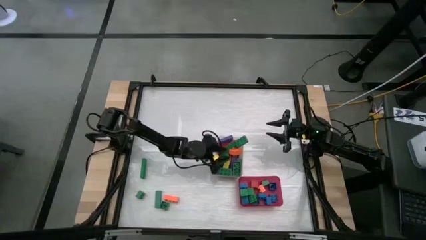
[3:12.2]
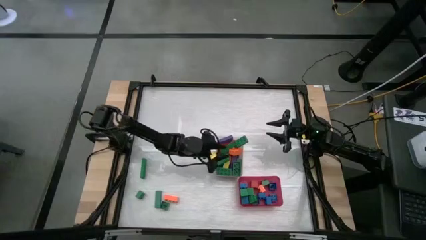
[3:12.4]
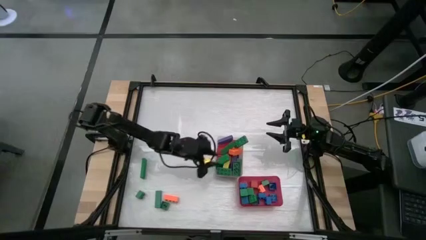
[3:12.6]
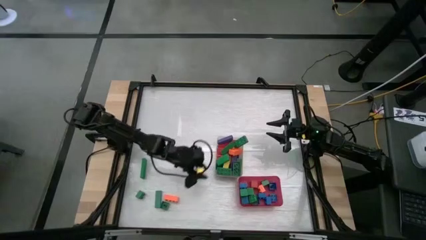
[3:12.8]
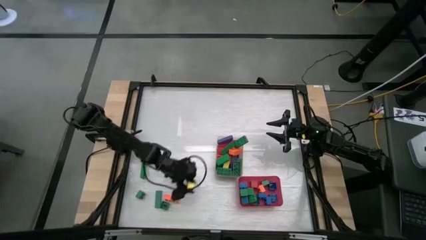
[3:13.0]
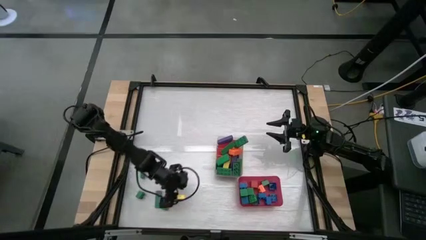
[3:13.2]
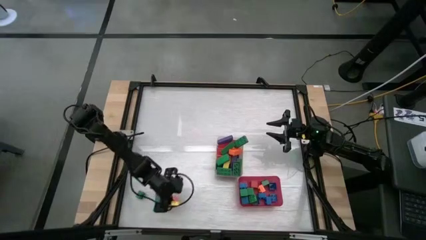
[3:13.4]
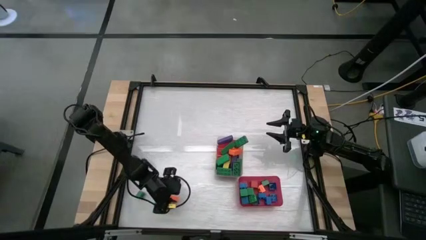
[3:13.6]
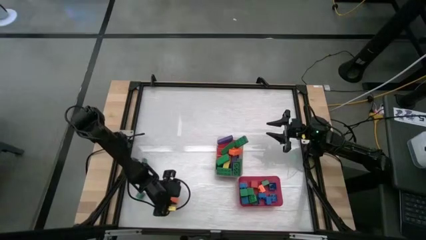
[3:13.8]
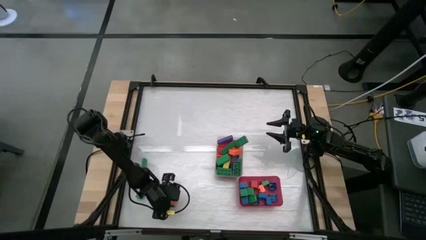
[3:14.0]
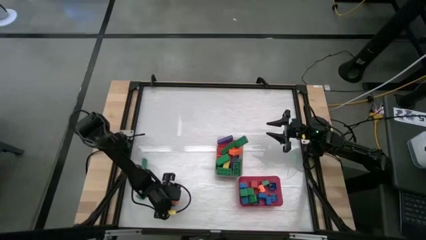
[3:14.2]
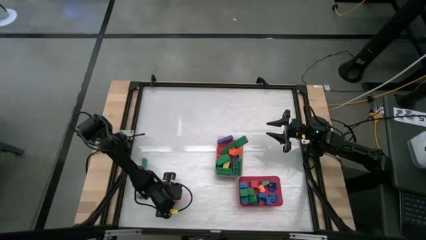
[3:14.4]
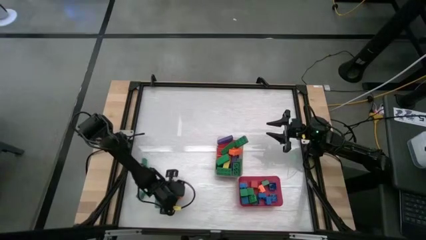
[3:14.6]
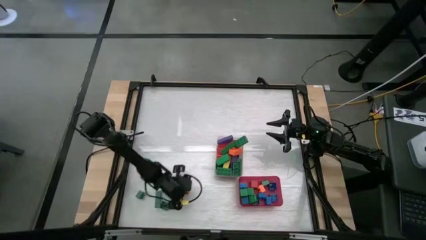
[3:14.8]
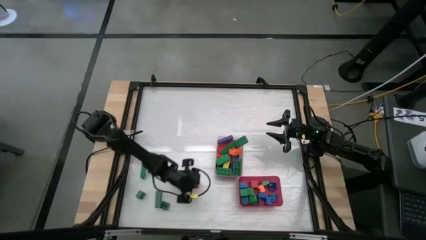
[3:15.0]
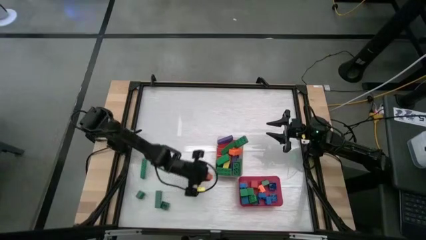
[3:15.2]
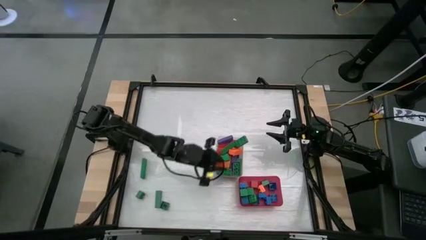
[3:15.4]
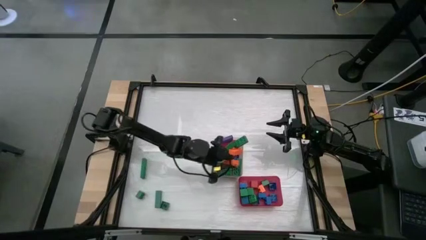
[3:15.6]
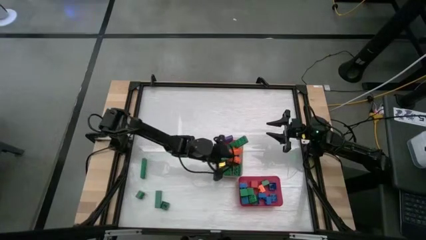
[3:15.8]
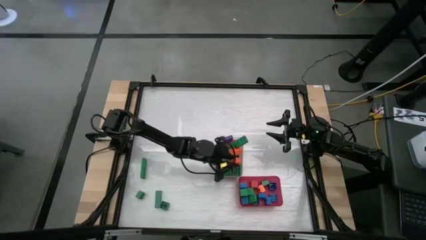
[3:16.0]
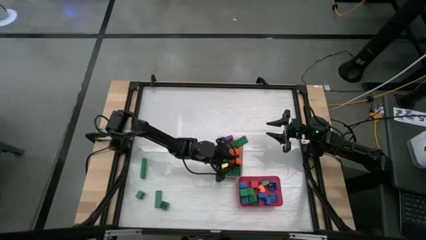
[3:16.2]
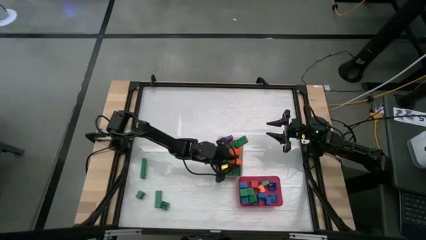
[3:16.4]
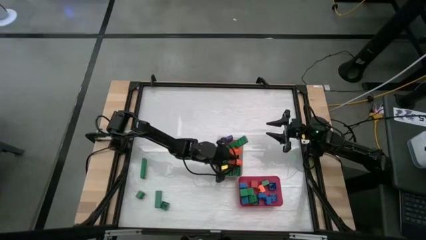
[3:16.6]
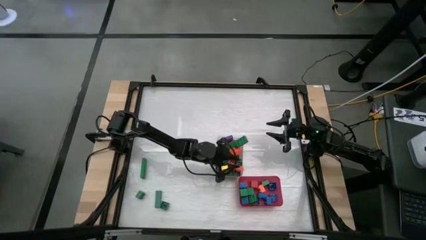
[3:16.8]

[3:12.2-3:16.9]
Task: Sort blocks by size
Put the orange rectangular game piece into the transparent bin

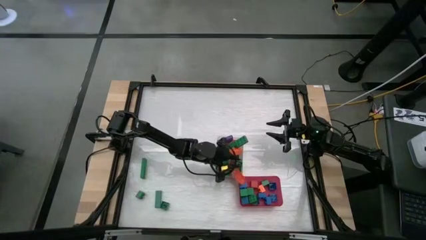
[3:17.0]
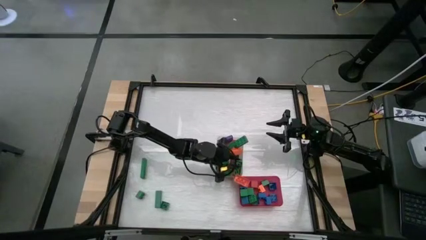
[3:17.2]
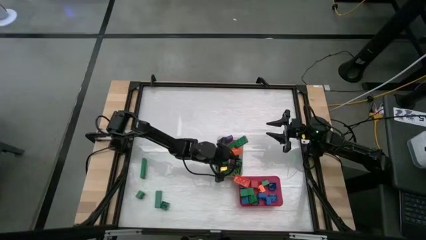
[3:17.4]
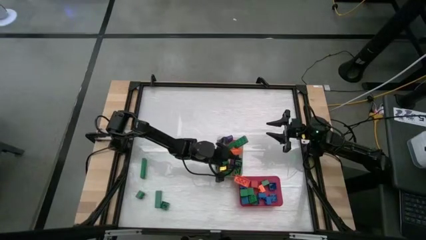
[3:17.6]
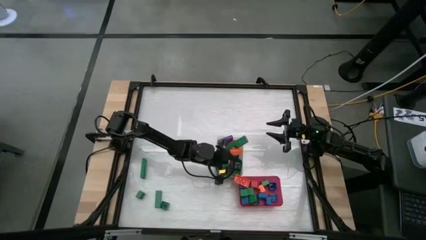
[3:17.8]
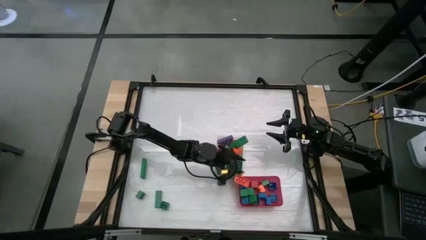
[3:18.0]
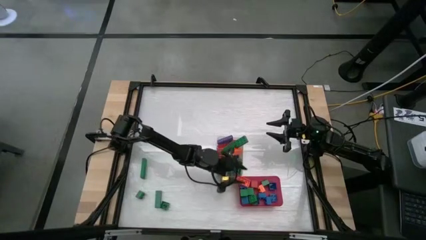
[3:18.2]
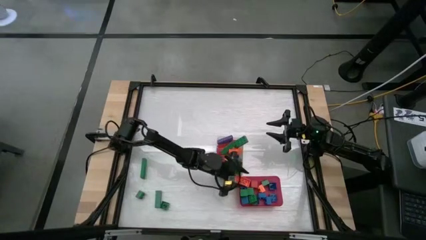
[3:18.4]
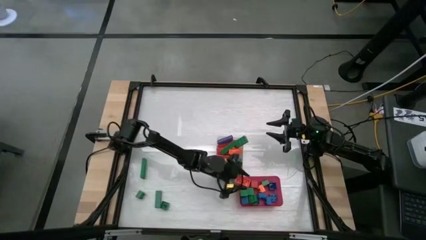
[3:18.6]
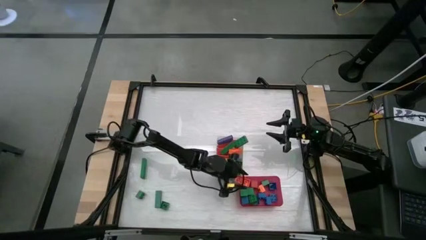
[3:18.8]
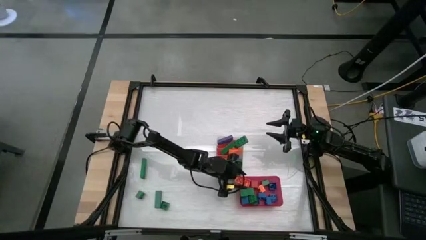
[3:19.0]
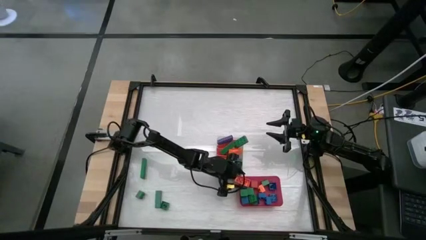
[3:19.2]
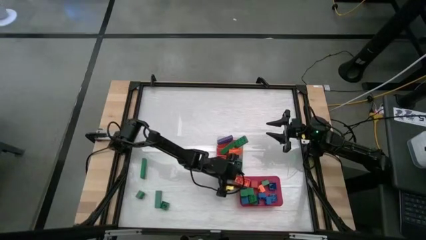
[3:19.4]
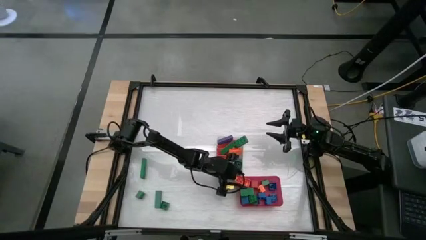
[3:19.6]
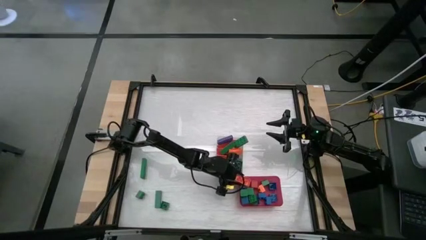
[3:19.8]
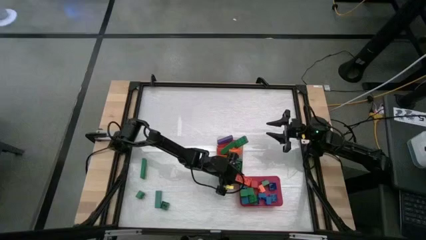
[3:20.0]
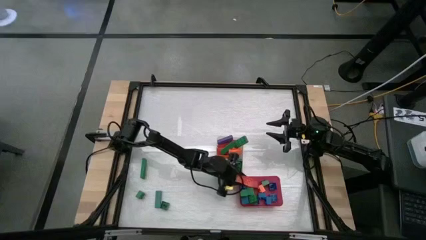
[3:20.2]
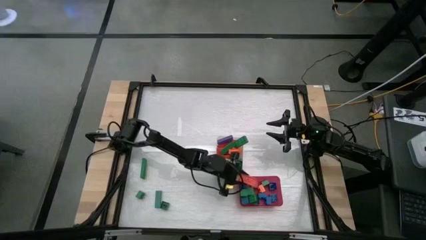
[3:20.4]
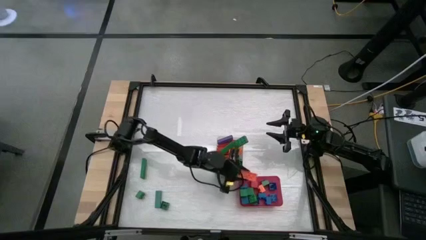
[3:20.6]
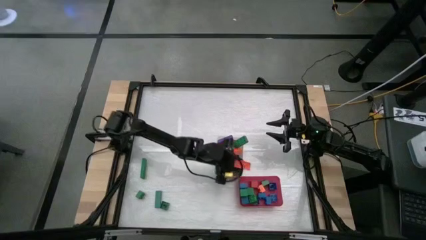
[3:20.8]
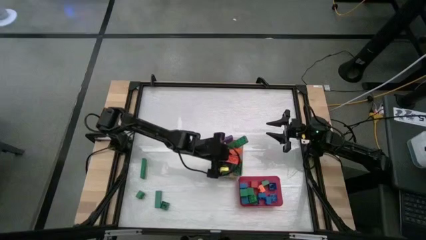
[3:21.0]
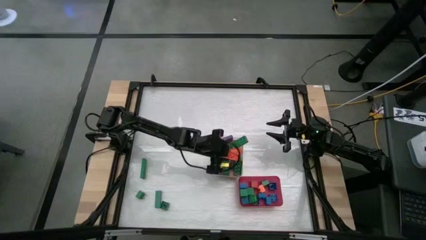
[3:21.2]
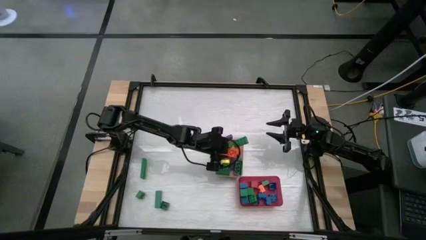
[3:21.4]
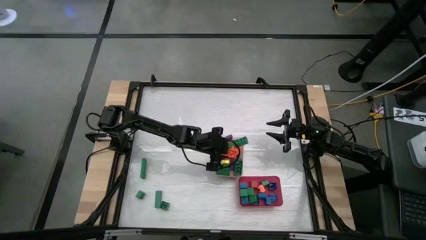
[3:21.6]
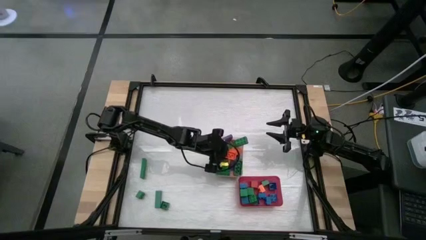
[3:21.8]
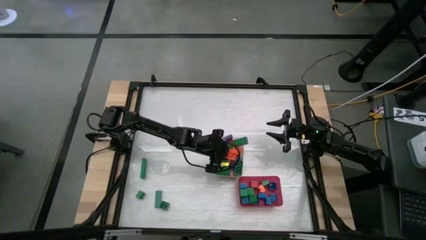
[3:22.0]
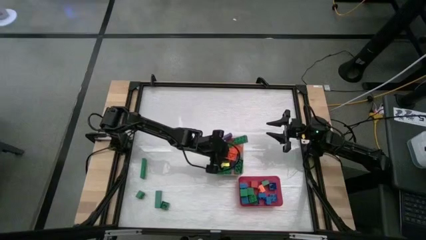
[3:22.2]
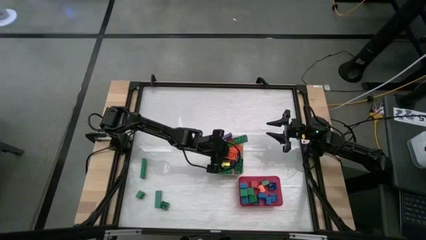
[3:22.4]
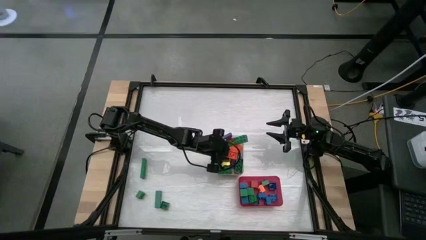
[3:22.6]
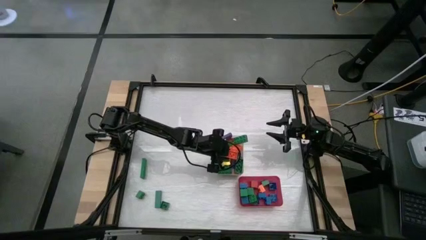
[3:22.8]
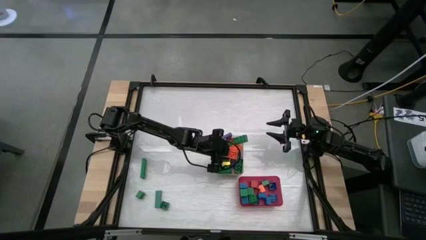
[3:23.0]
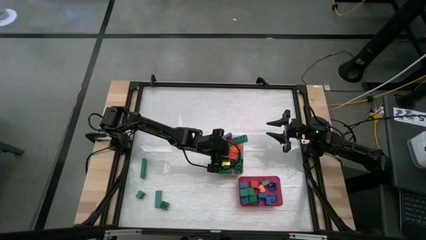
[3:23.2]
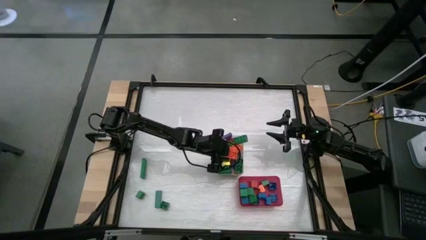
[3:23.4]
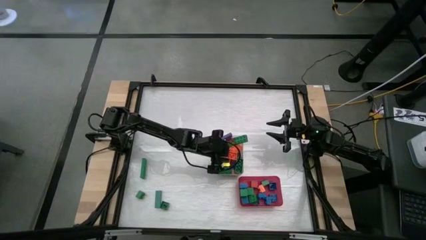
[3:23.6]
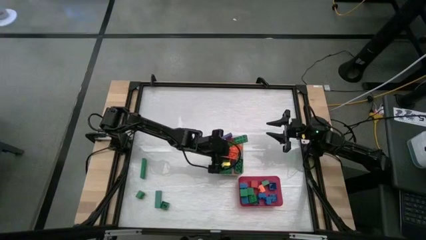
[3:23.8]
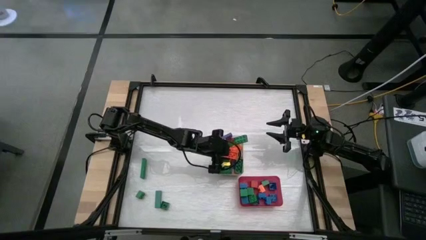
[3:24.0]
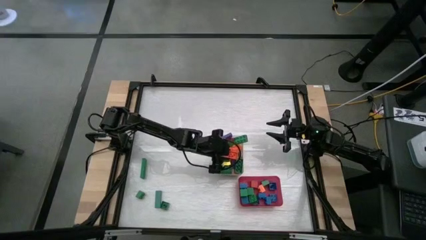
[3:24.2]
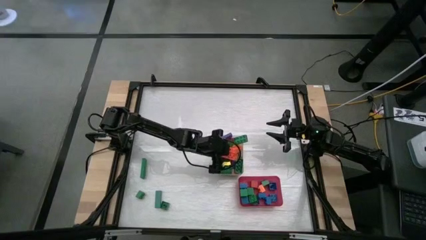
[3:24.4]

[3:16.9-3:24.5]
Put the orange rectangular game piece into the transparent bin

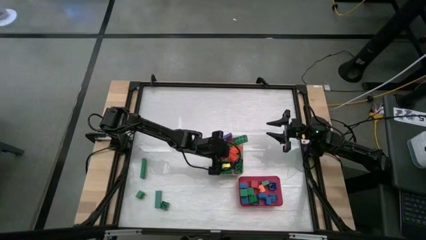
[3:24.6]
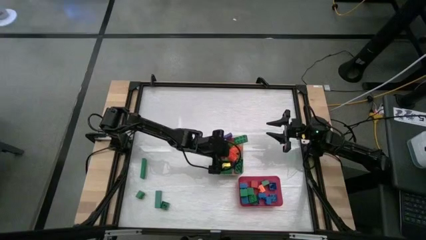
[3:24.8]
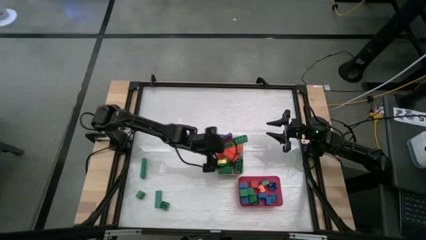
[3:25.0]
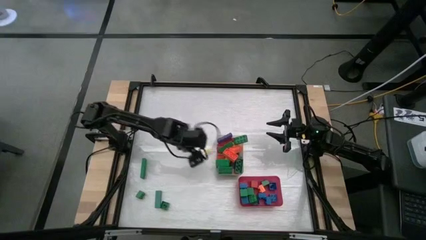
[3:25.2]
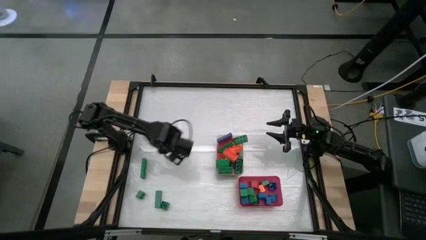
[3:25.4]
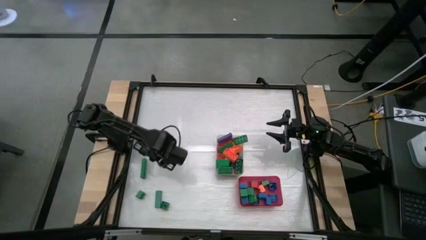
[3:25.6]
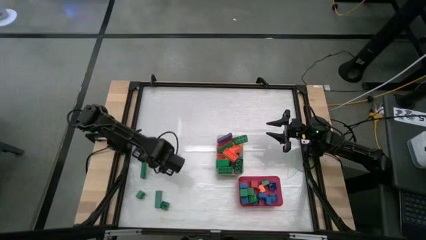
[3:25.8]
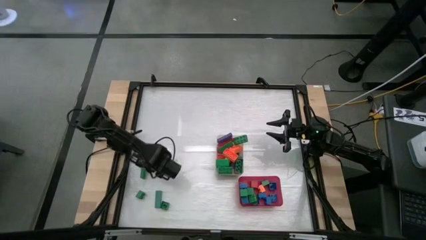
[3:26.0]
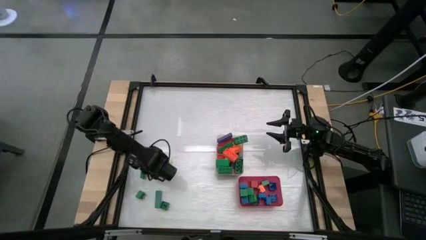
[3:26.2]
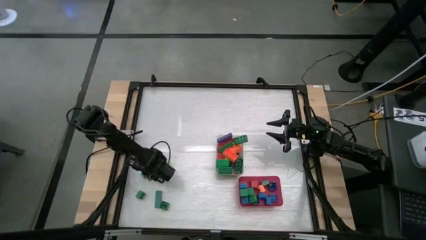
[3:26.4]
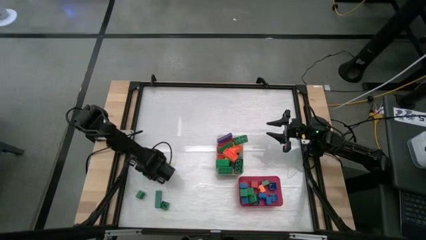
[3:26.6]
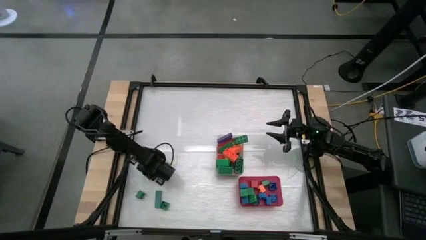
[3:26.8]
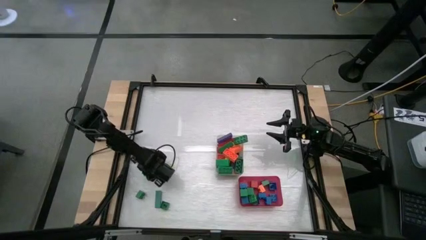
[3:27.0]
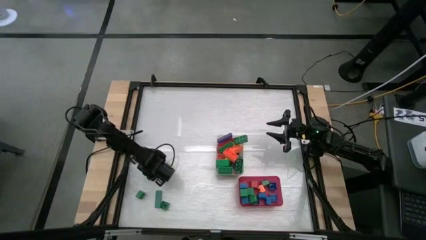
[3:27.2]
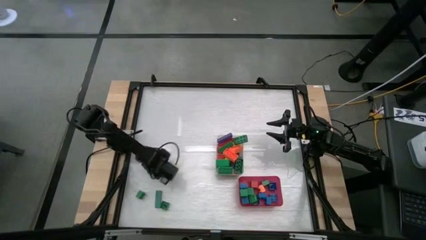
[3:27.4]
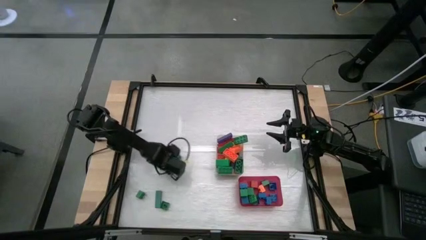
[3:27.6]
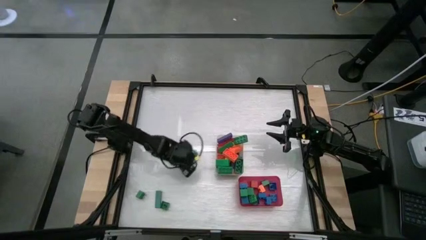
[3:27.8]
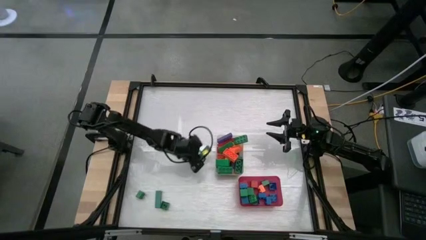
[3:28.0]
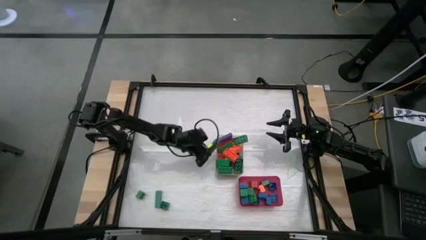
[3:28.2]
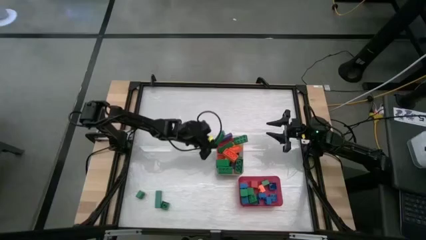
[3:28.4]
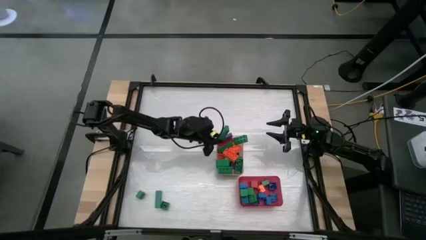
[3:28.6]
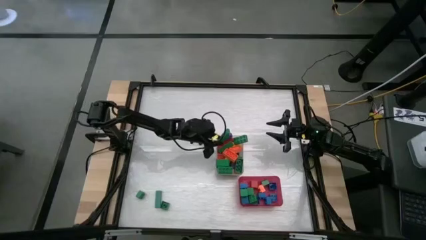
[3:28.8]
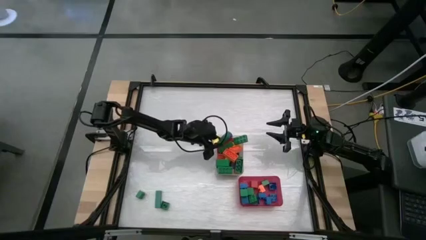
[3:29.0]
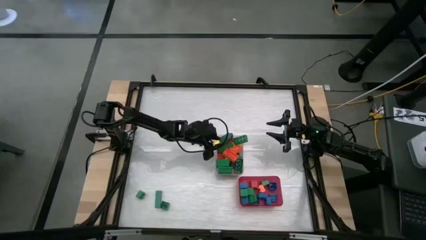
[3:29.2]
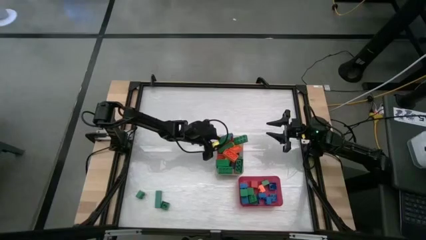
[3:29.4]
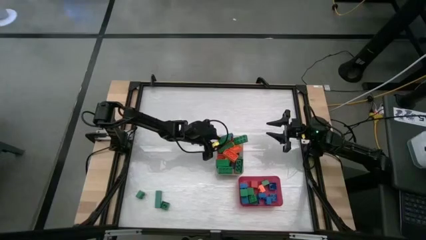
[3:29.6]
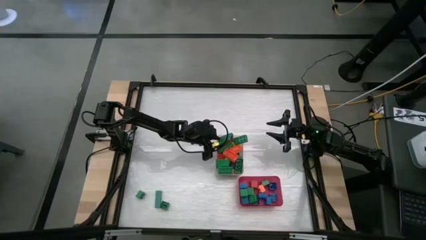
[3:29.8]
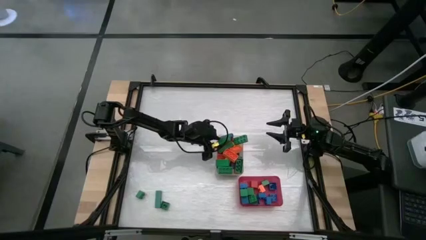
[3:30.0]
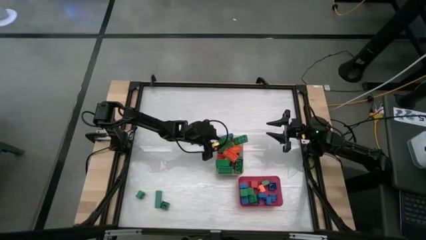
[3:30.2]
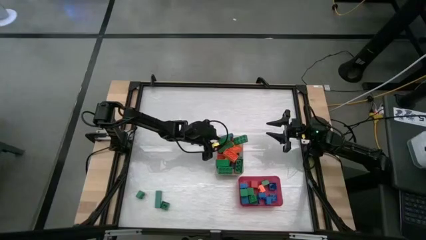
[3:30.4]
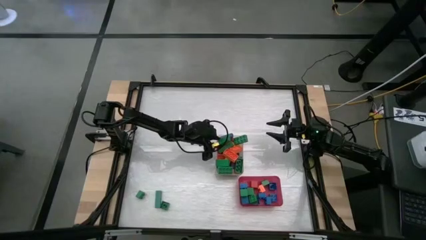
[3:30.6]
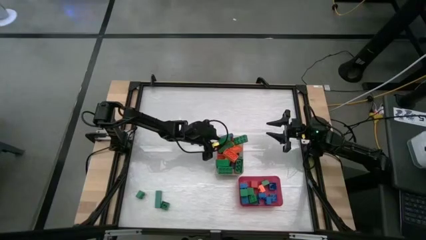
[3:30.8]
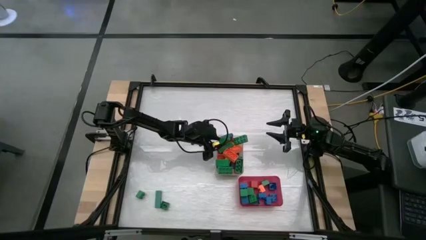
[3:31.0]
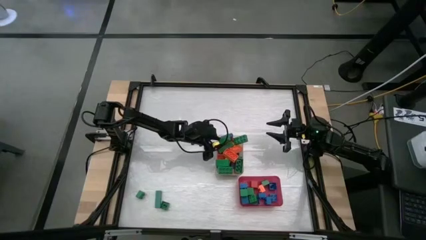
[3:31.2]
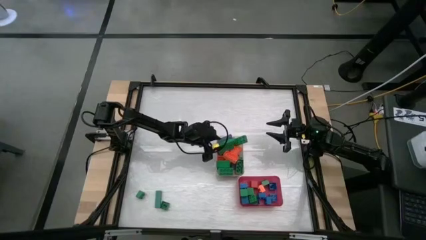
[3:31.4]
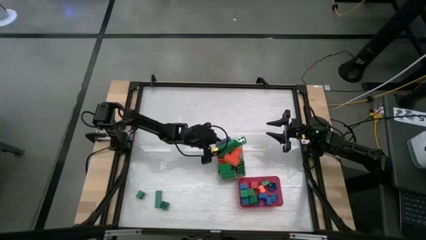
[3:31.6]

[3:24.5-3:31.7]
Put the green rectangular block into the transparent bin
